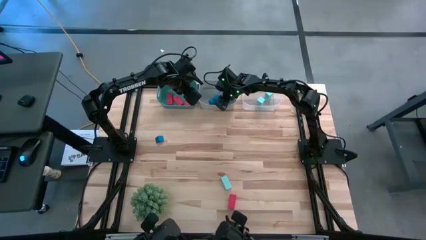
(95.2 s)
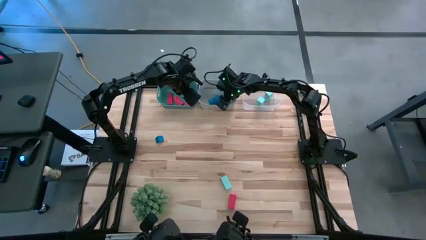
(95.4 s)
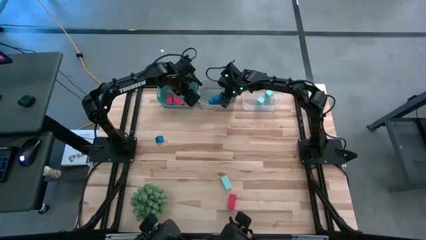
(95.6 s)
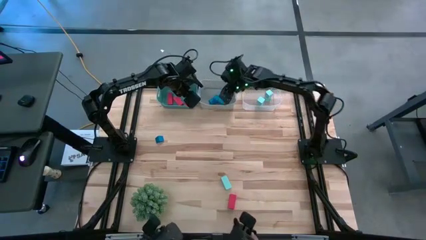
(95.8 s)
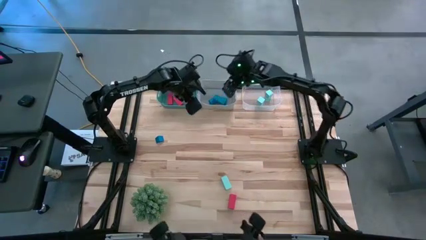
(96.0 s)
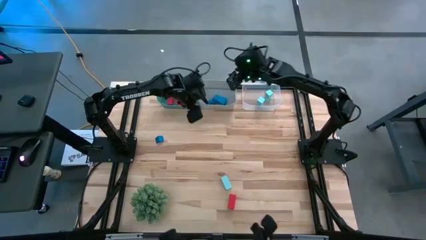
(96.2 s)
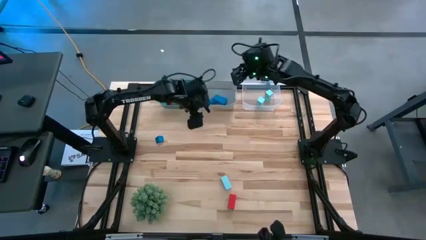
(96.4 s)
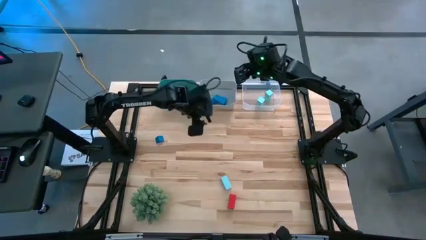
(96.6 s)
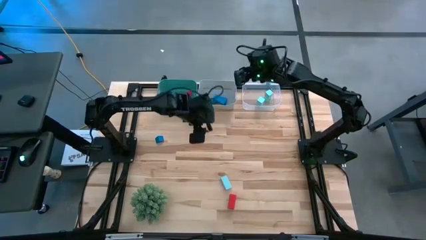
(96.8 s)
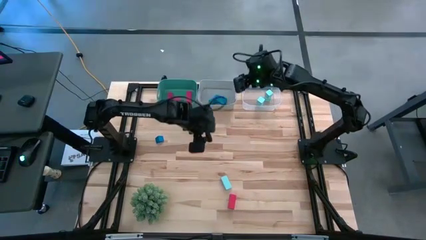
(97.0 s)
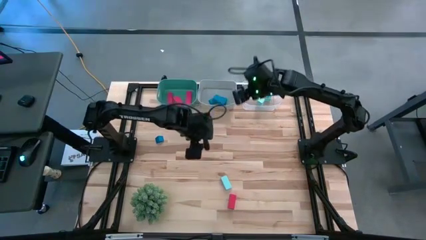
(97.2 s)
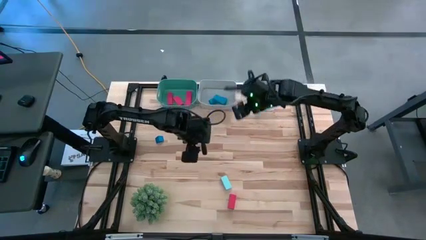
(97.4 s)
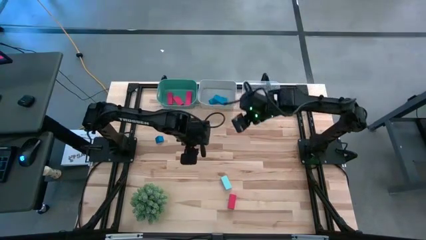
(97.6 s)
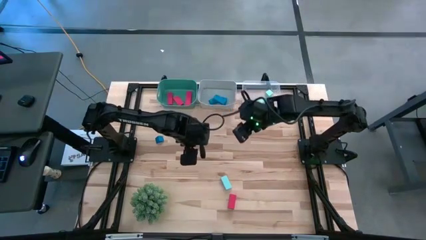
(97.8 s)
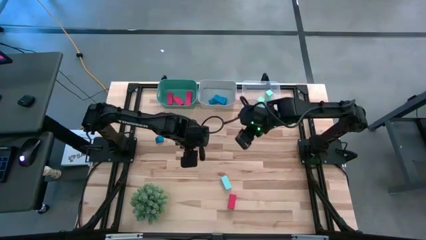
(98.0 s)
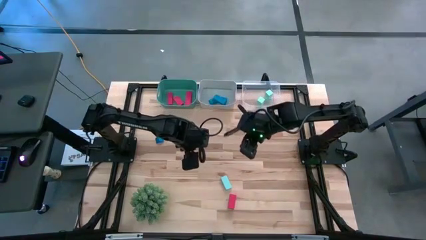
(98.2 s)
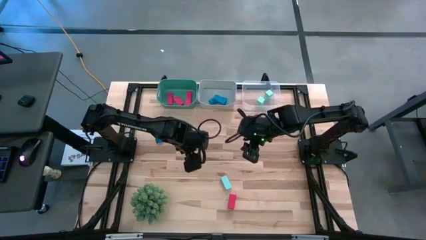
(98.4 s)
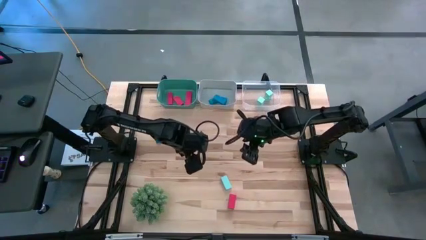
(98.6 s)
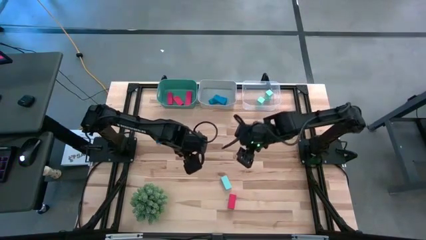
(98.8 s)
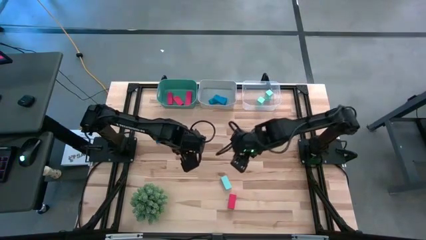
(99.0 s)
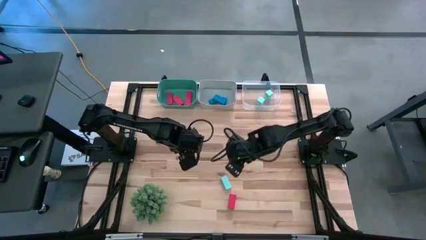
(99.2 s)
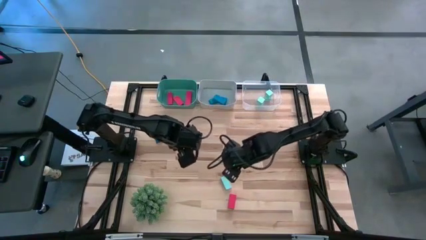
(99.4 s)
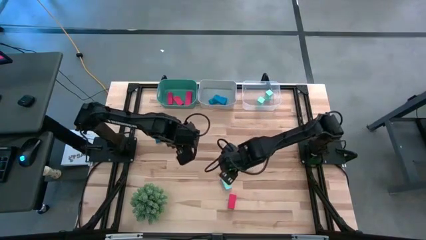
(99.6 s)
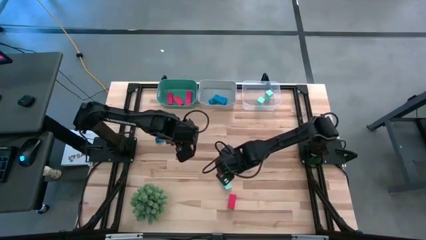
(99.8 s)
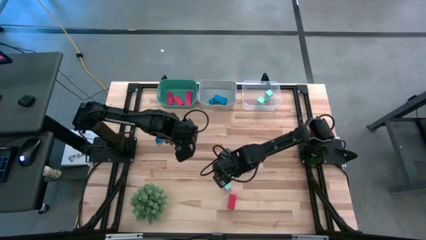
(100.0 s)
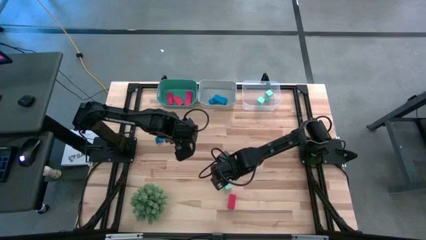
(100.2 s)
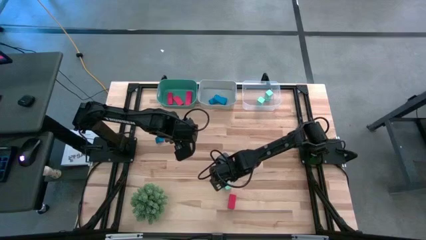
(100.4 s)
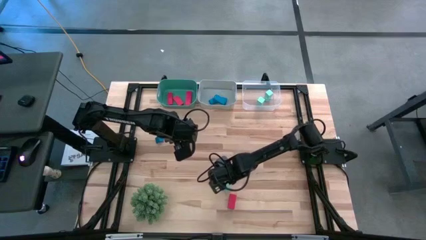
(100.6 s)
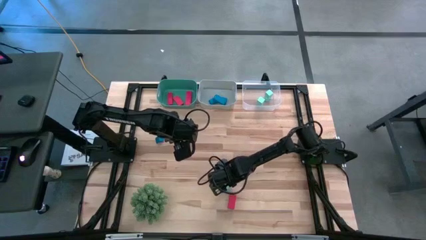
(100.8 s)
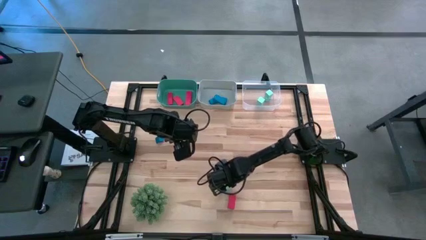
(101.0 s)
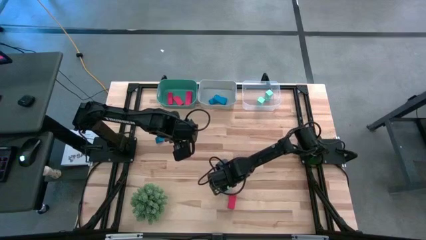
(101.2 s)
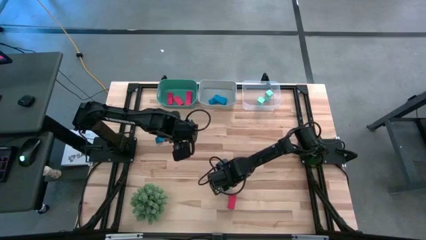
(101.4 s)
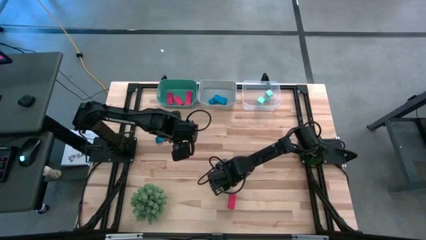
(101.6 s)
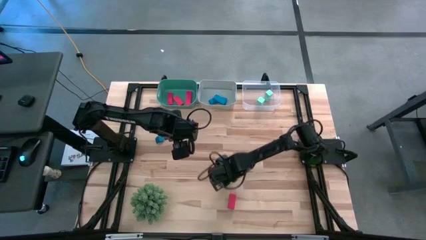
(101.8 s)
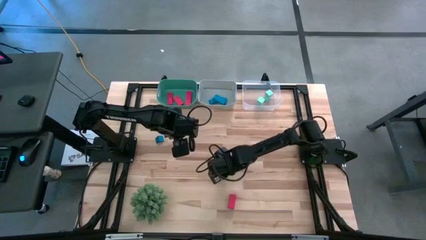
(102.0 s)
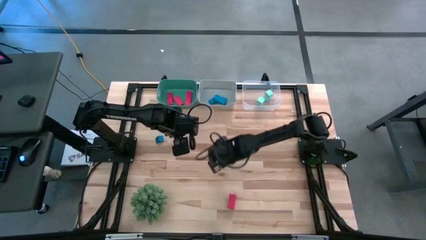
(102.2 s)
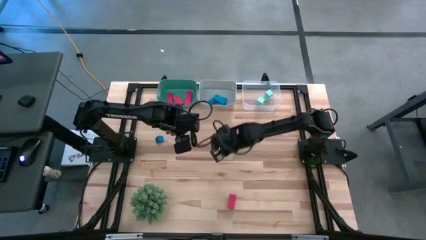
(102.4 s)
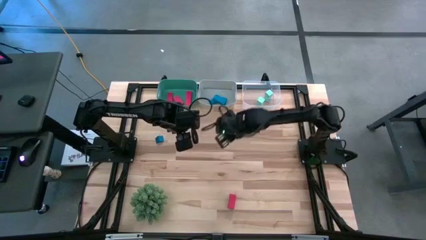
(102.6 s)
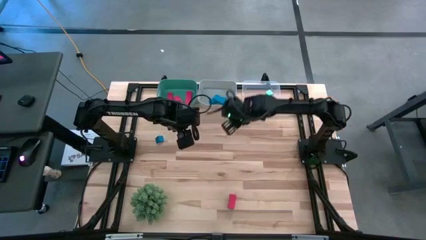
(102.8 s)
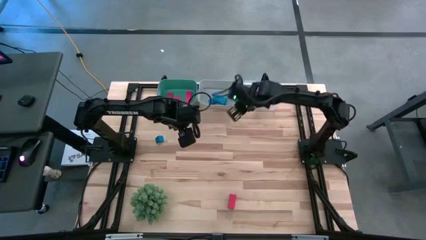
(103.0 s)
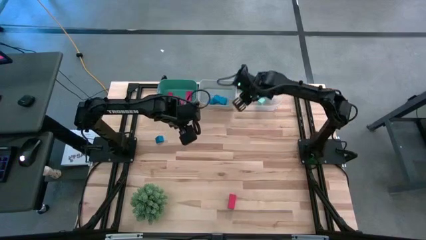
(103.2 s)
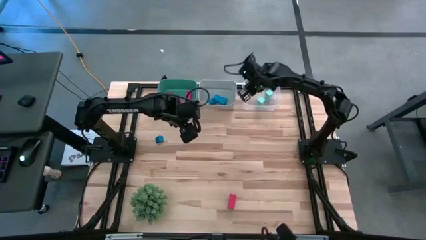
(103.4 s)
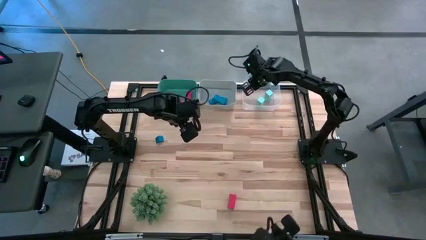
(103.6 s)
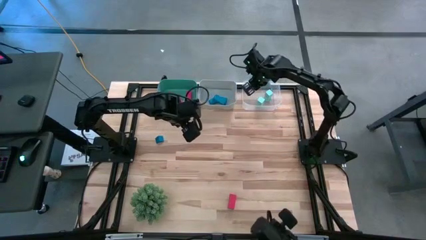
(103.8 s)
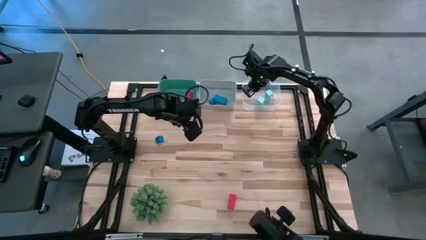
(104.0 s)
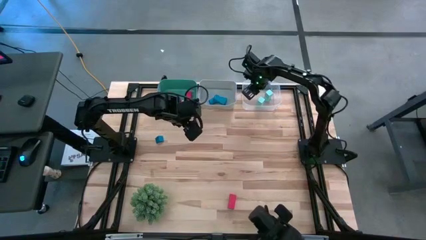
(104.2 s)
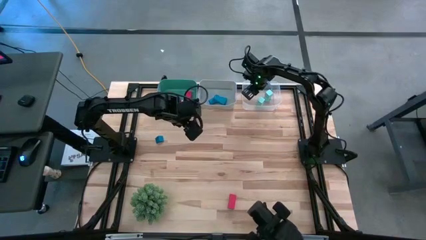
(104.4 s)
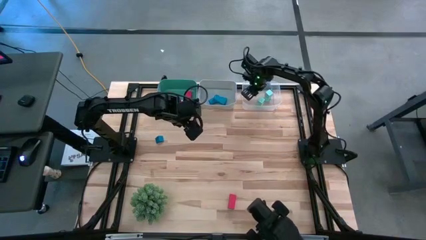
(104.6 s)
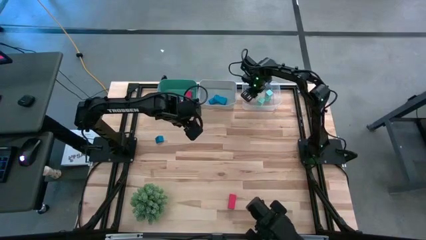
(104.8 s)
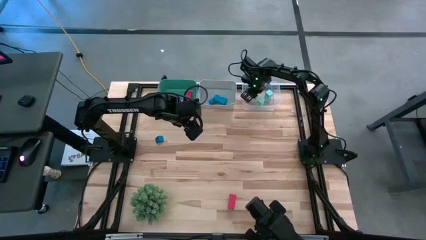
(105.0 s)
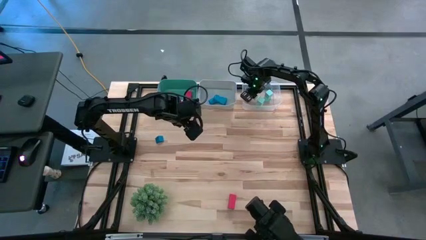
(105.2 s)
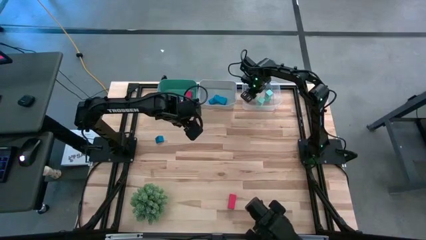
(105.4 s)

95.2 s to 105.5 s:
Task: Sort & place blocks by color
Put the light blue block into the transparent bin

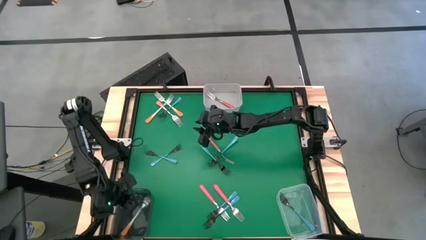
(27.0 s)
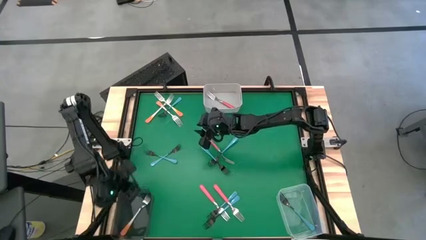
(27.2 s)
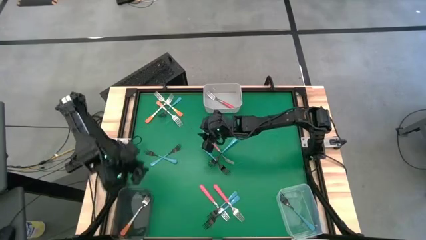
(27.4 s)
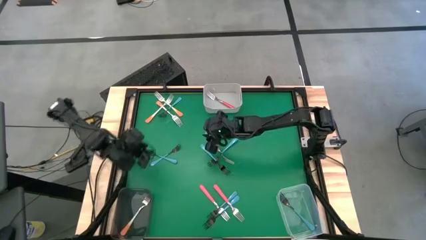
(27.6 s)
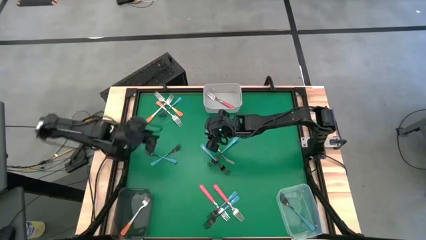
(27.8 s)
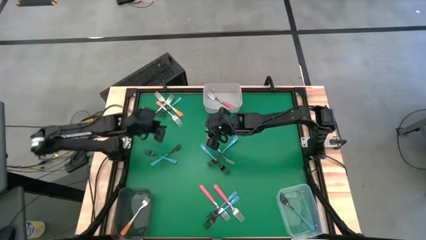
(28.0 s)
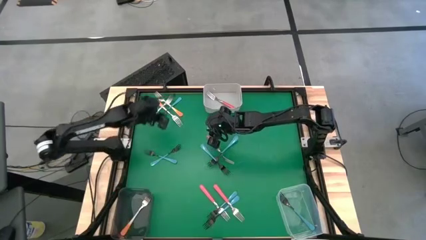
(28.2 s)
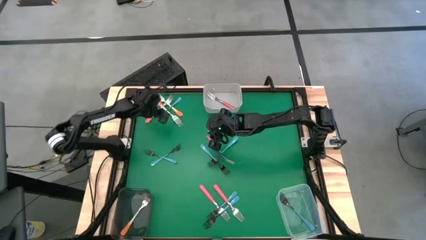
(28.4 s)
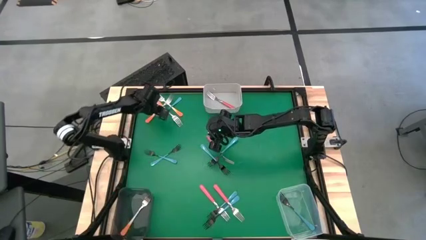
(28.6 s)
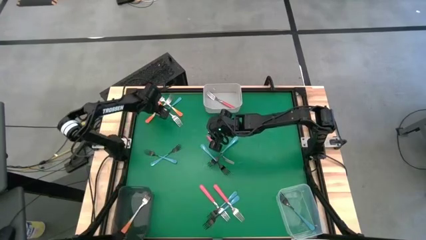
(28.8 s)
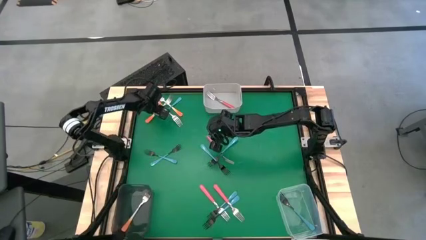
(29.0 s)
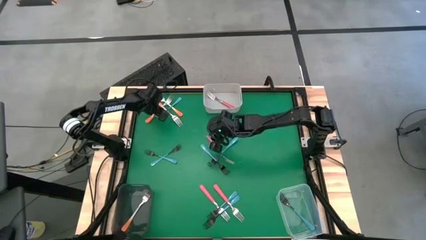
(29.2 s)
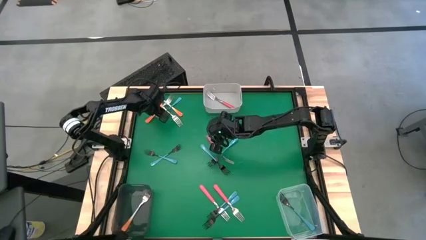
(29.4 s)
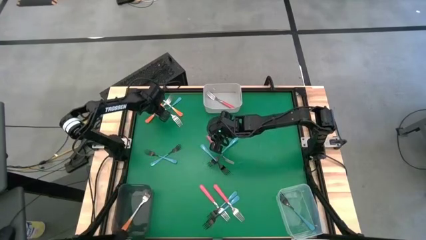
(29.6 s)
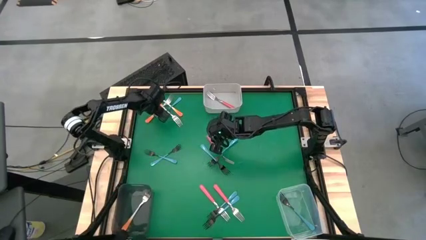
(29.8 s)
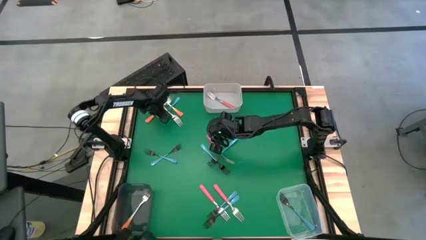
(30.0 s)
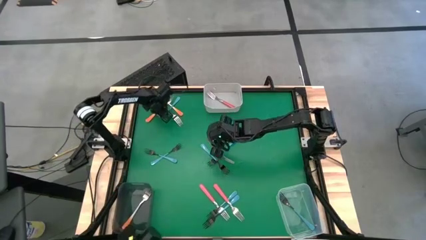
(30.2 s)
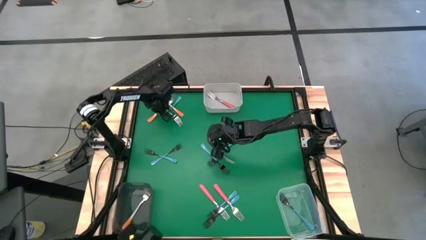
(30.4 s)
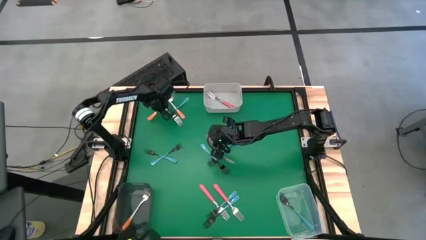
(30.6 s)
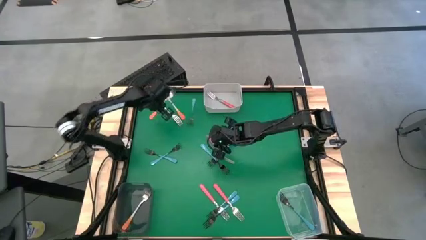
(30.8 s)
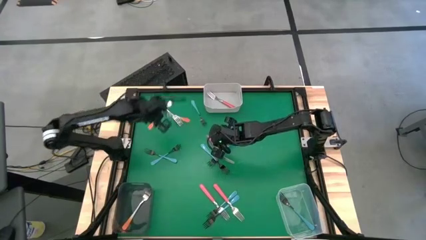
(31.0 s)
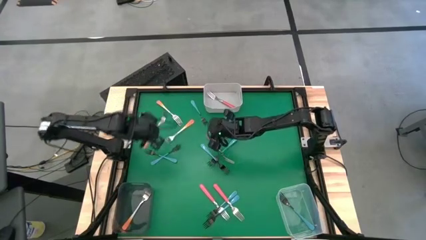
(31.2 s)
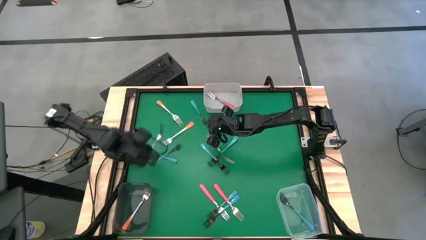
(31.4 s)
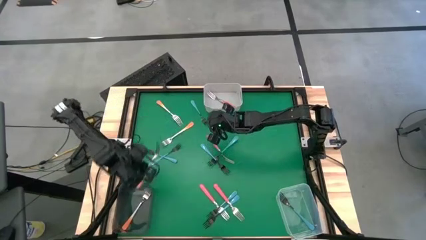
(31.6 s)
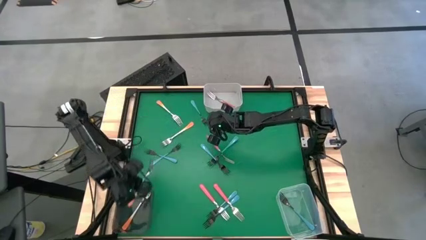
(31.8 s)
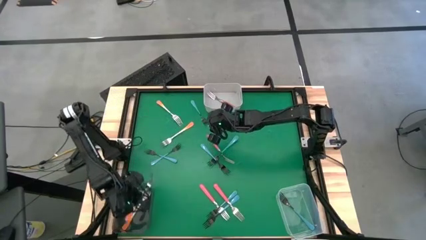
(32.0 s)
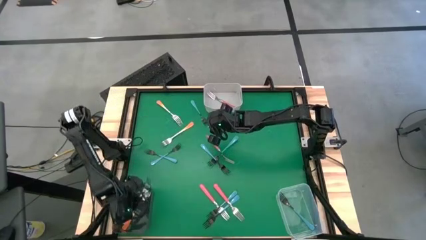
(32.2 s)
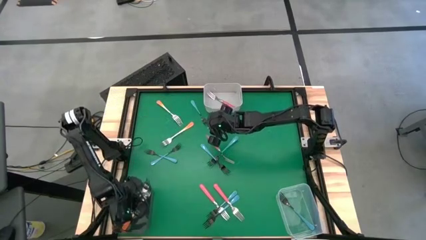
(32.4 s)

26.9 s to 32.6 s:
Task: Sort silverware by color (type)
Put the orange fork into the black bin
